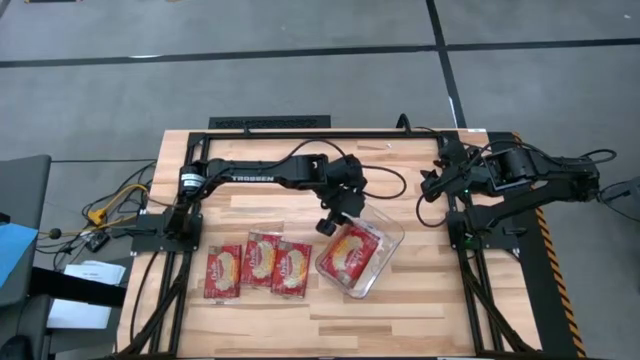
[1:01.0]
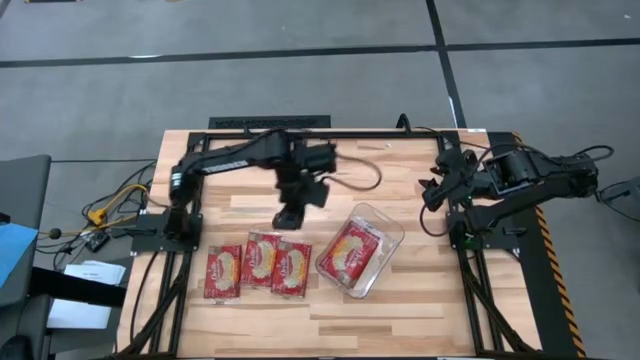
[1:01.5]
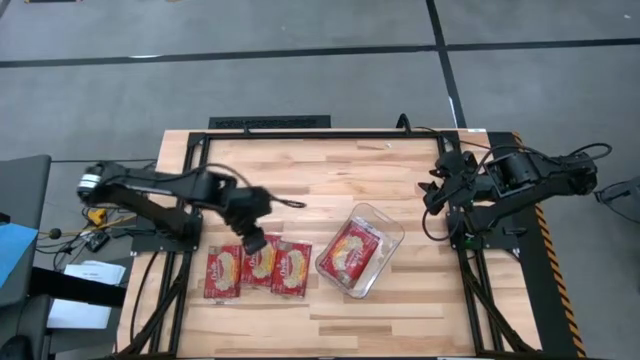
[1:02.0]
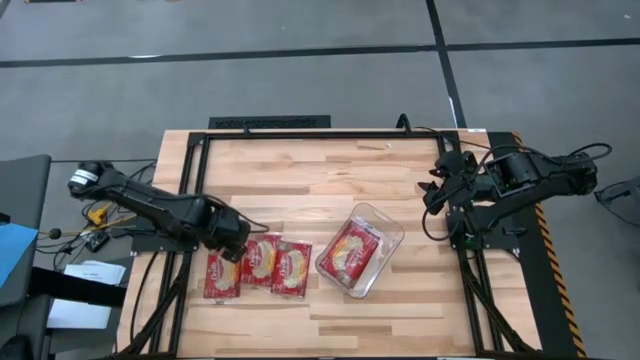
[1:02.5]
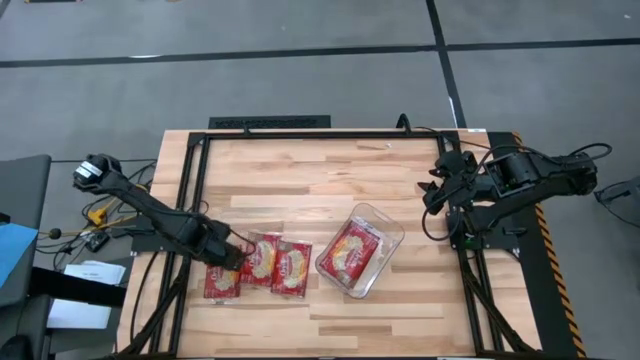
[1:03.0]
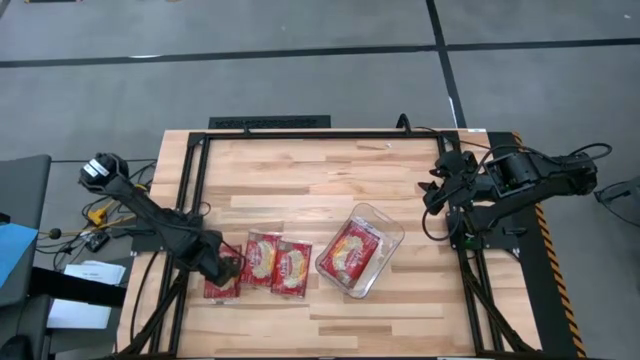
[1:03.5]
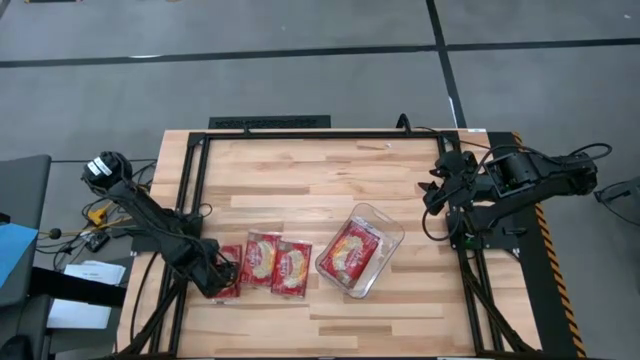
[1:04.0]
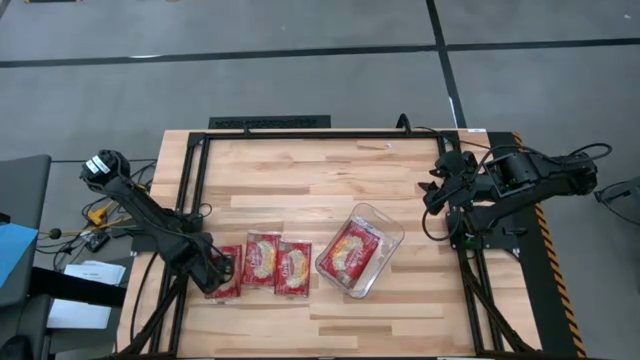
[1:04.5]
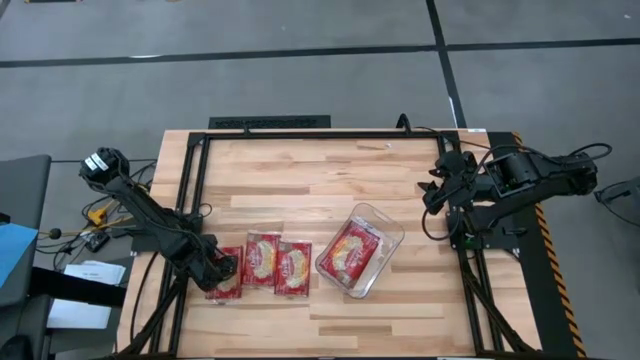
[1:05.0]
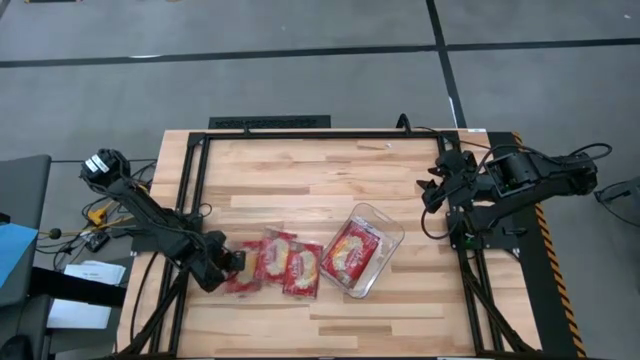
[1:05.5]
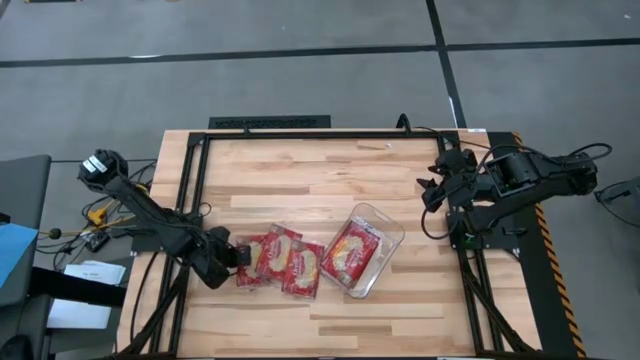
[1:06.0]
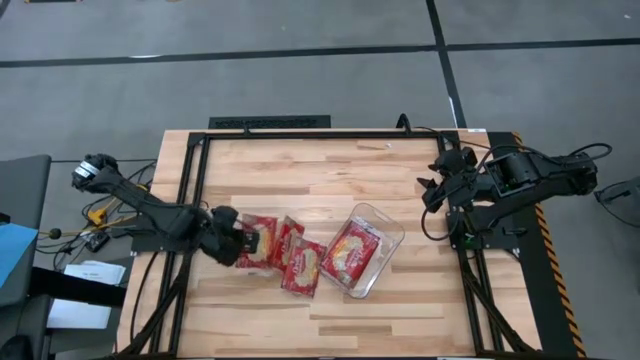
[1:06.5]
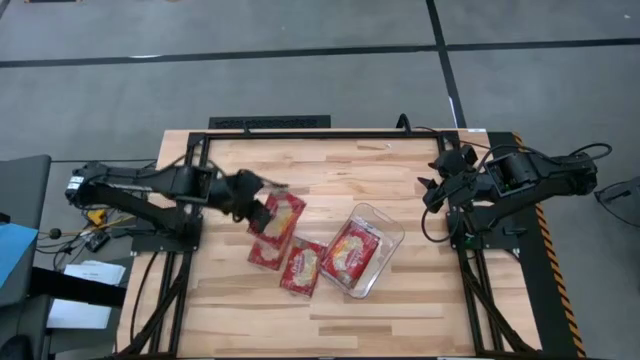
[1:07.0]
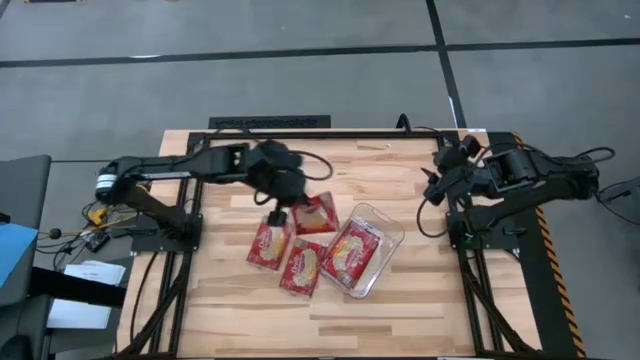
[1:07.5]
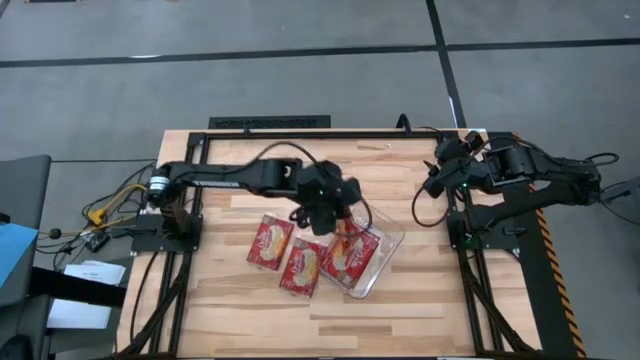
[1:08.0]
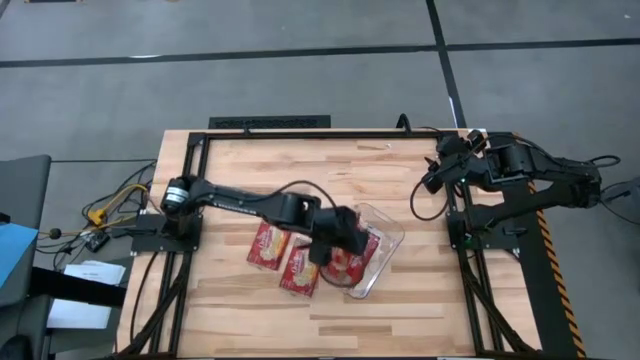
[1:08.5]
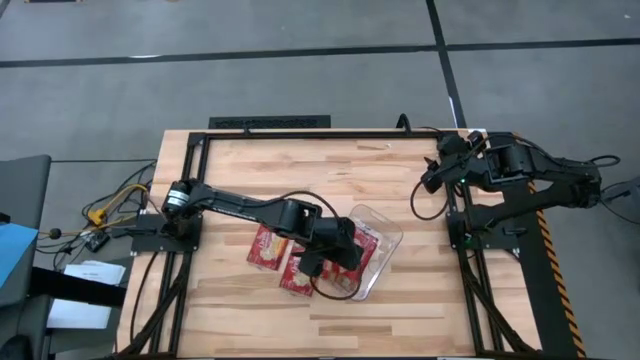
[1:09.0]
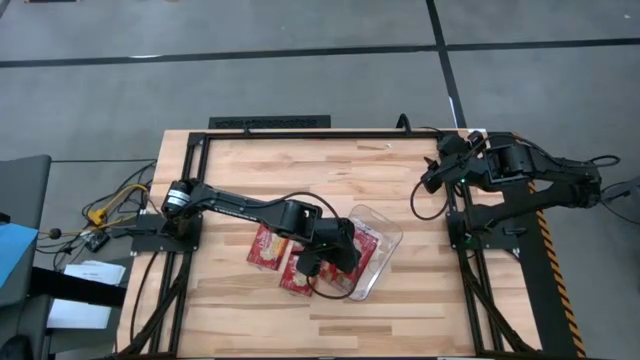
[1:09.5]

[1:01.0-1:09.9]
Task: Sort popcorn bags into baskets
Put the left red popcorn packet into the transparent bin

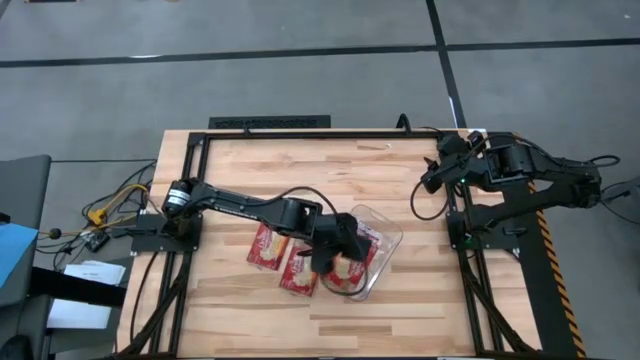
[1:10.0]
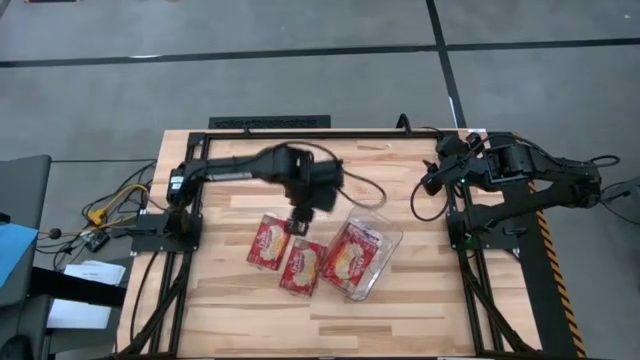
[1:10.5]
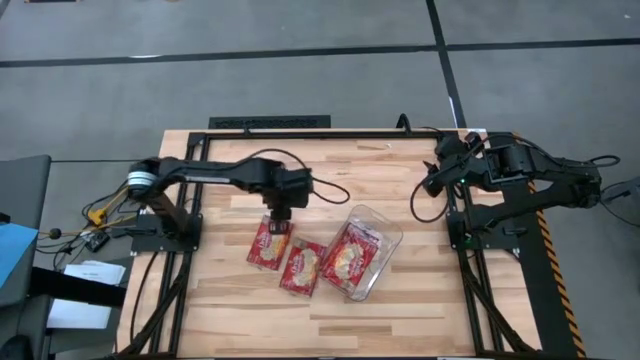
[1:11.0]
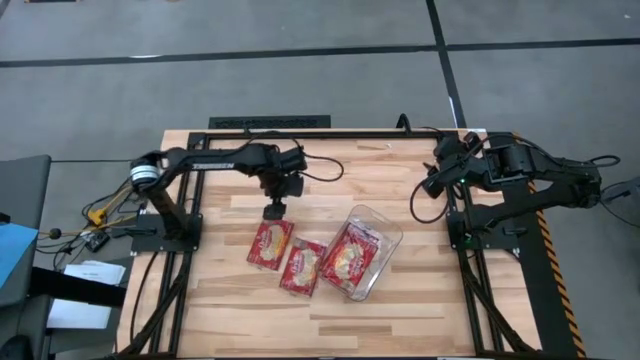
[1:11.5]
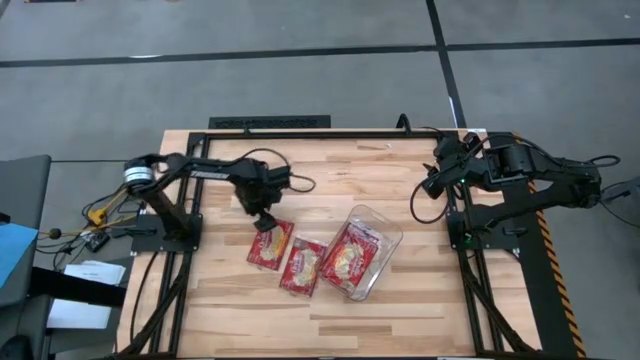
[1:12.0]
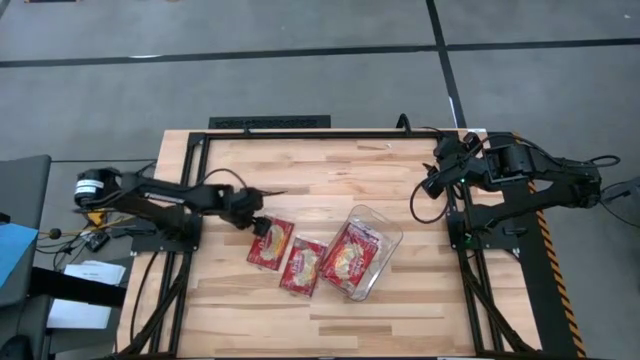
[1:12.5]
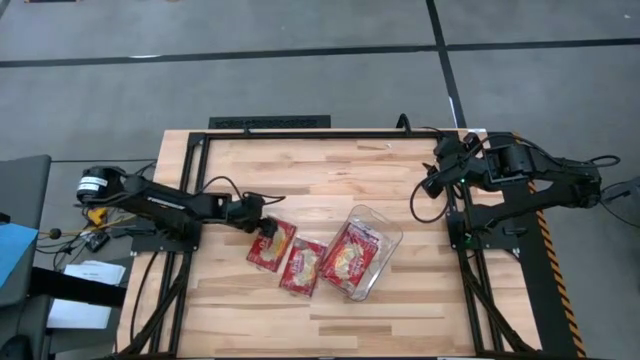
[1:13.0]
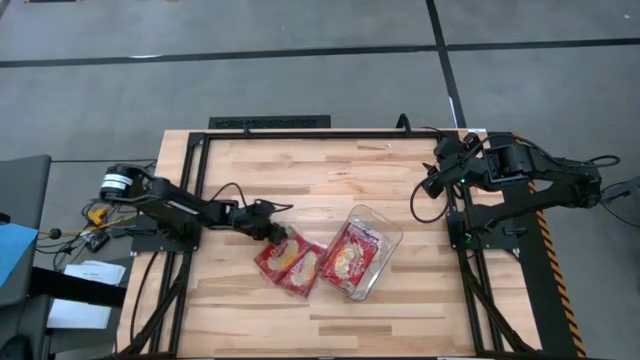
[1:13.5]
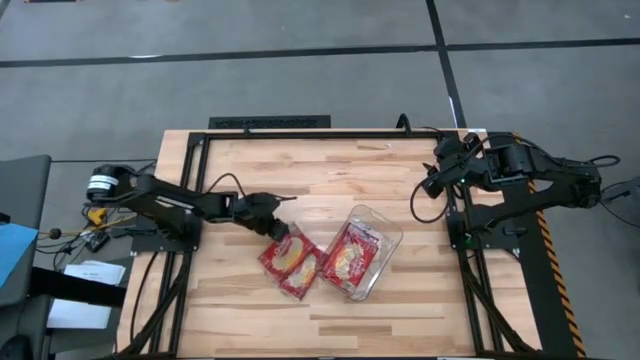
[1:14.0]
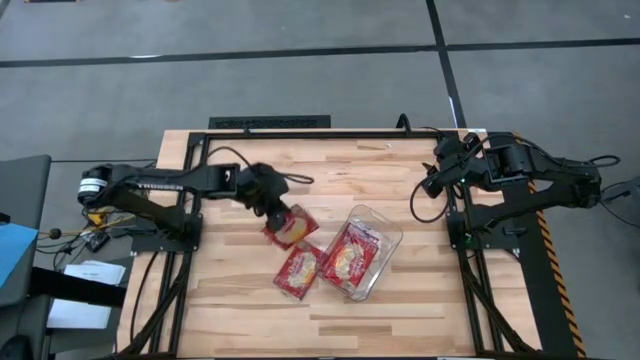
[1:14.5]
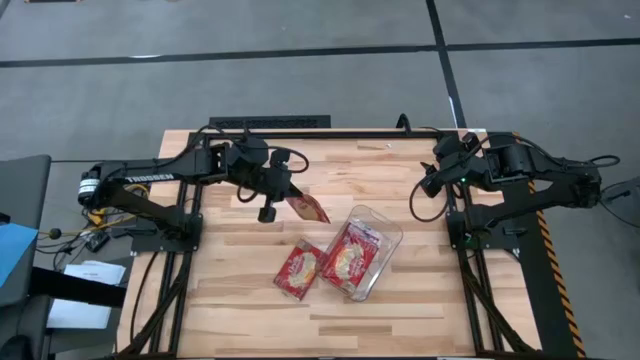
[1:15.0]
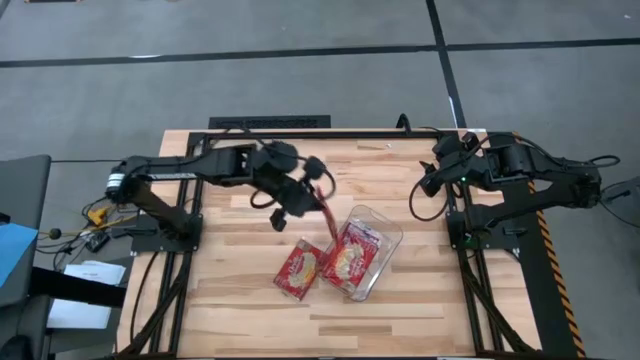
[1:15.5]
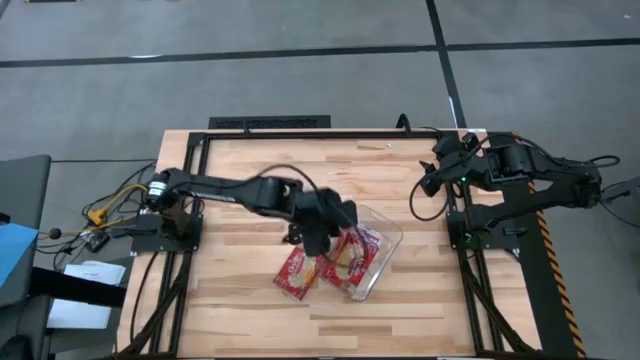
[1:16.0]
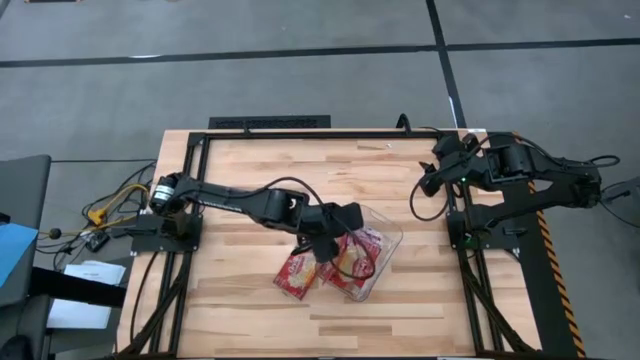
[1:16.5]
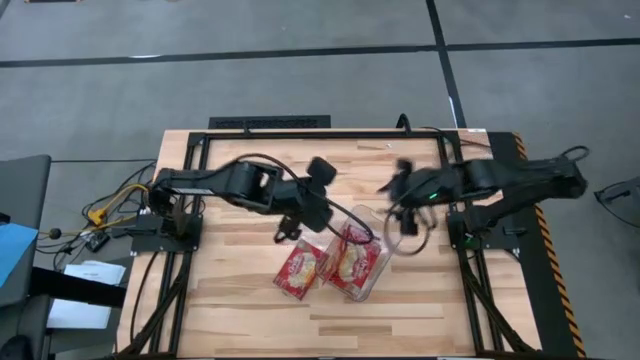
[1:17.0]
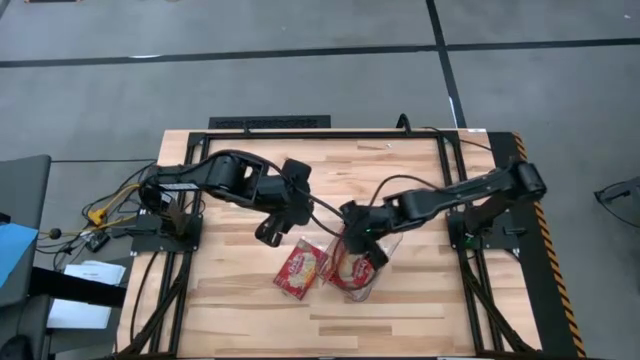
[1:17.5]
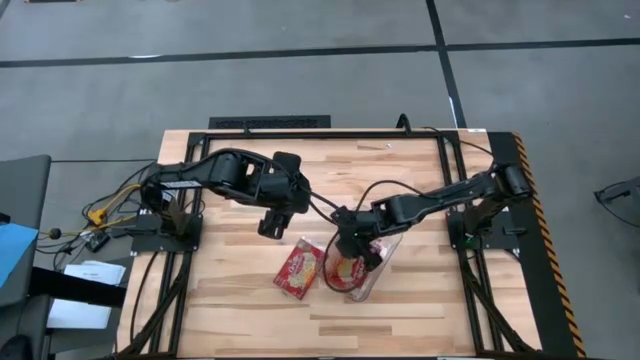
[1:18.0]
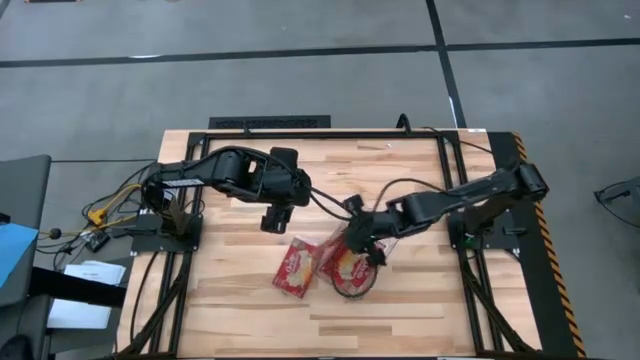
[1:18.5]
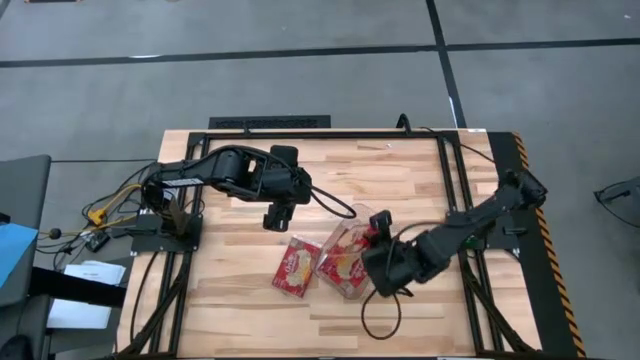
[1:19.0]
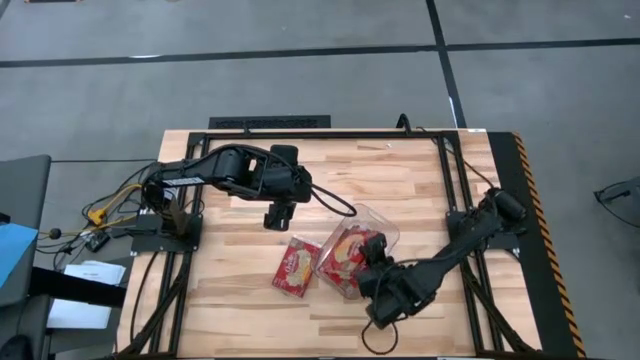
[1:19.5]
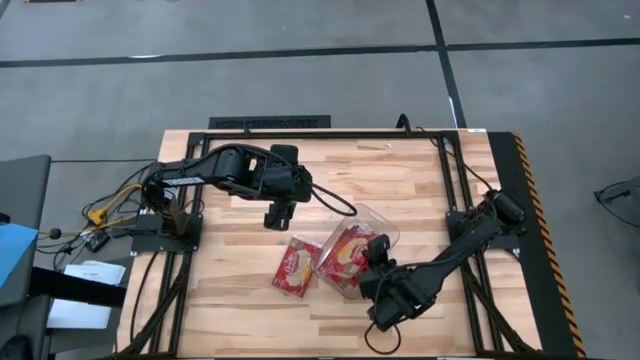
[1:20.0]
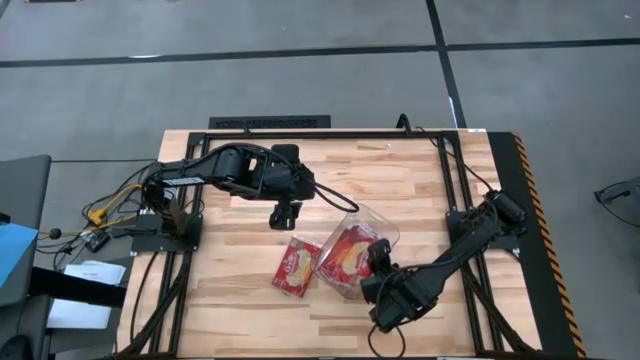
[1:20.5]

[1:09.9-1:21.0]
Put the left red popcorn packet into the transparent bin

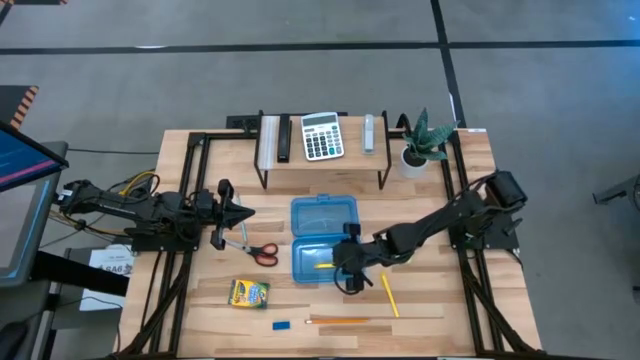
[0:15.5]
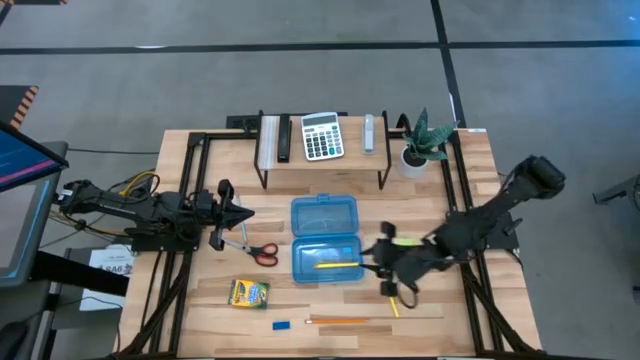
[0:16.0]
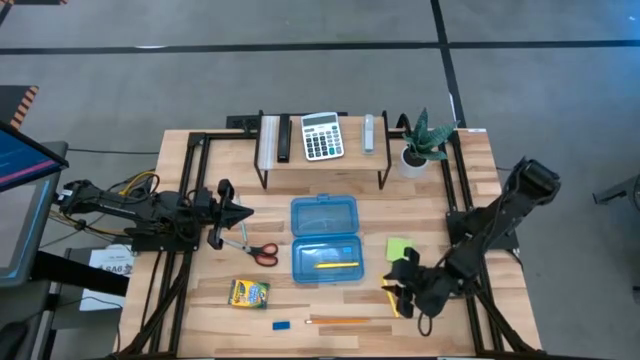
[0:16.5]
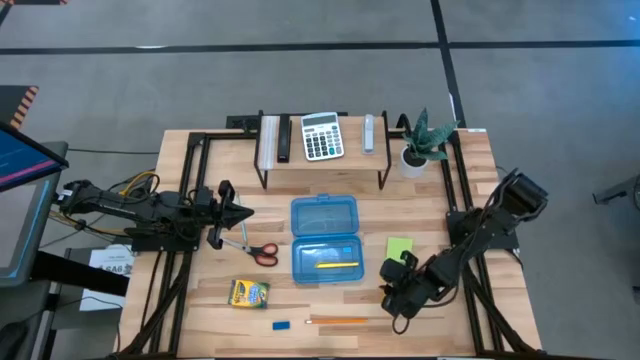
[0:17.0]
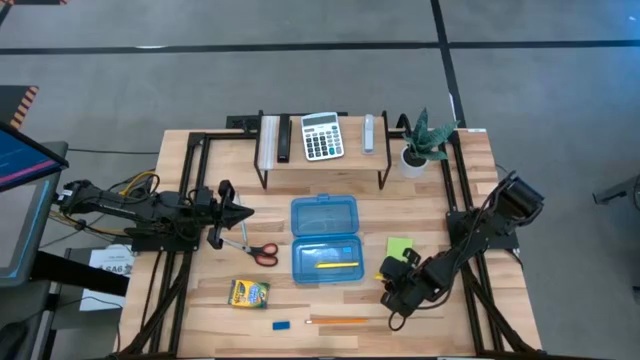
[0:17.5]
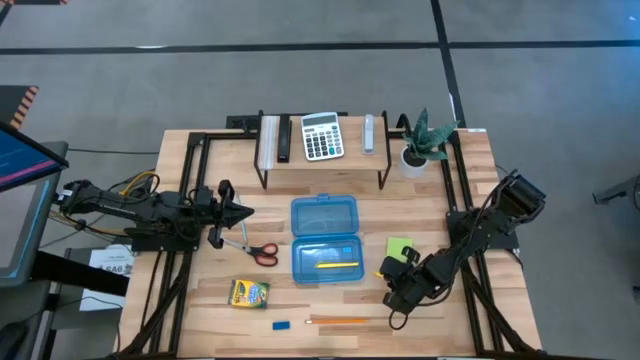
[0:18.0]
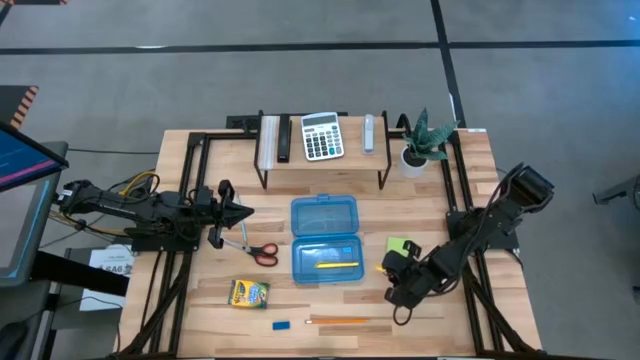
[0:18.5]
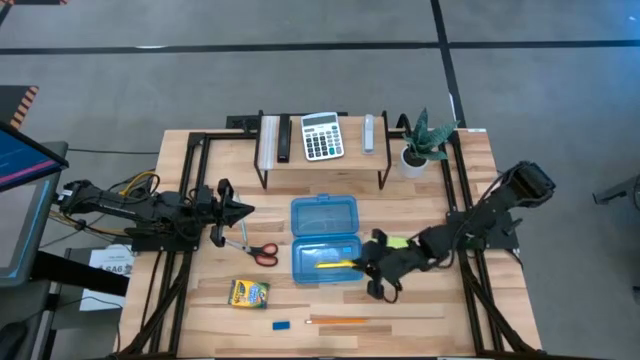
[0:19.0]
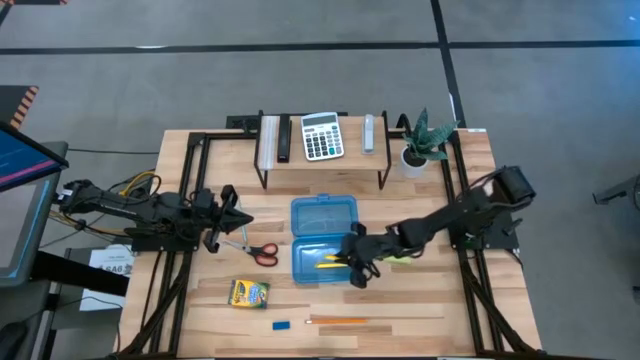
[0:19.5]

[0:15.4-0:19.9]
Task: Pack school essentials
Put the yellow ballpoint pen into the blue supply box
